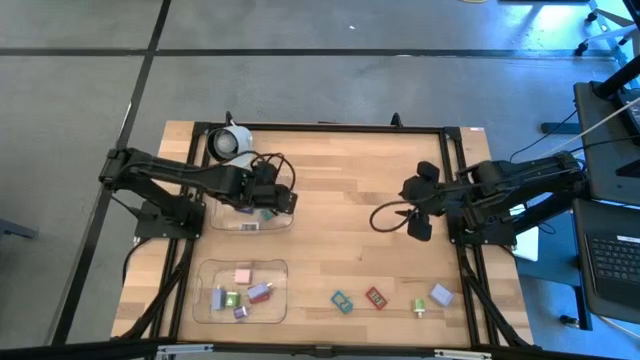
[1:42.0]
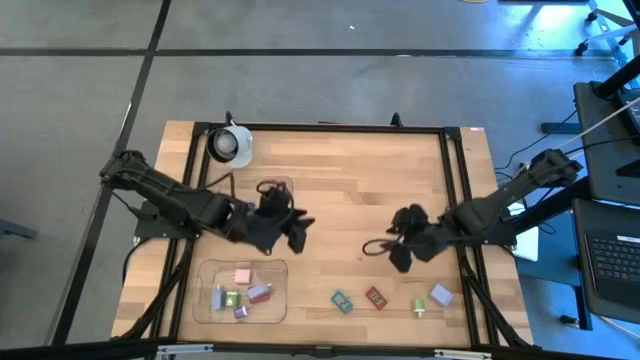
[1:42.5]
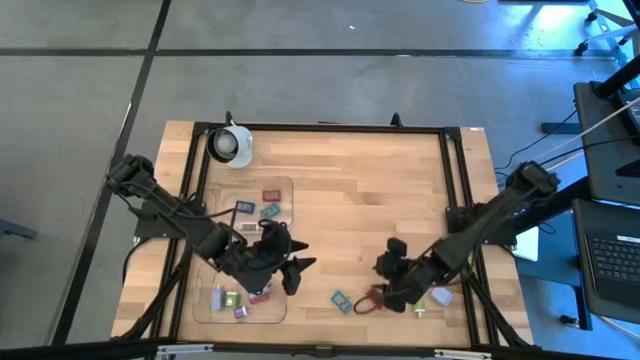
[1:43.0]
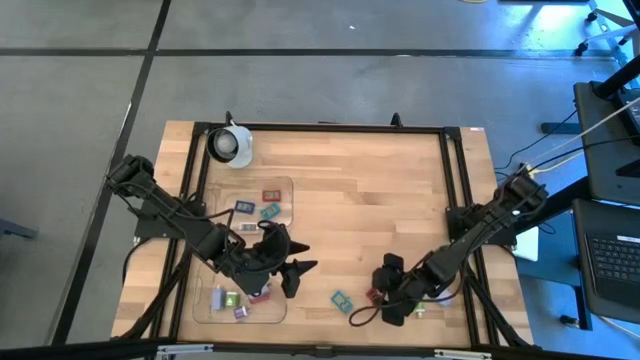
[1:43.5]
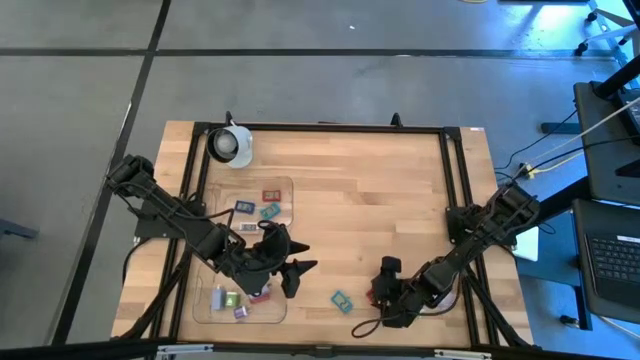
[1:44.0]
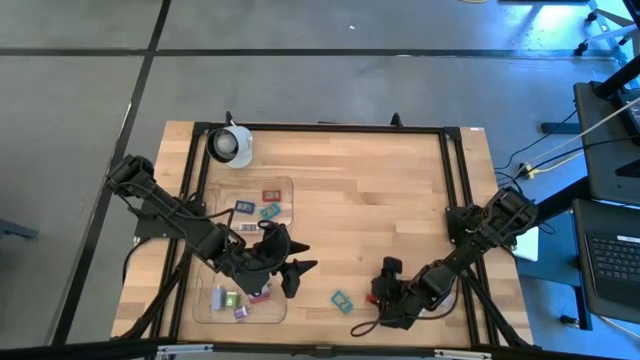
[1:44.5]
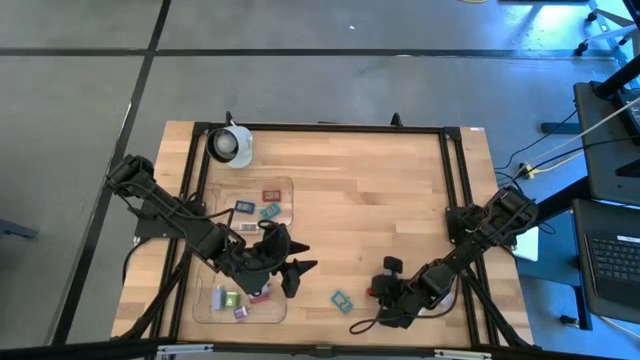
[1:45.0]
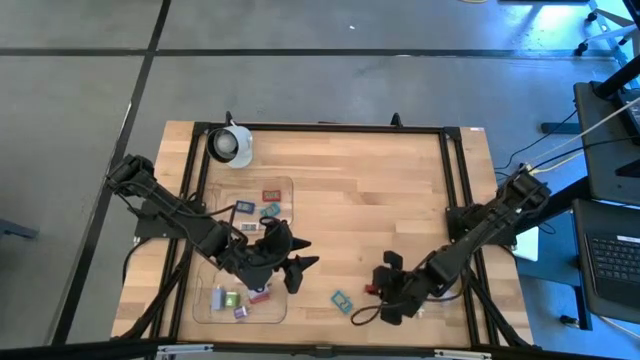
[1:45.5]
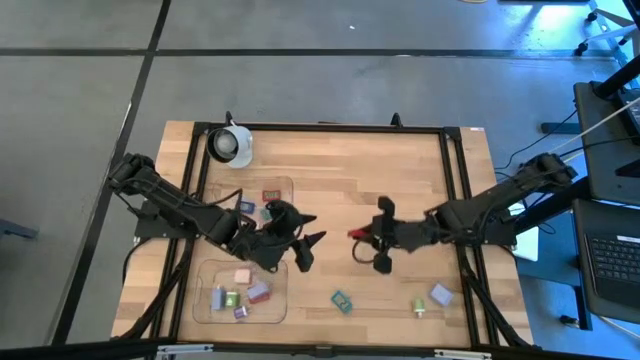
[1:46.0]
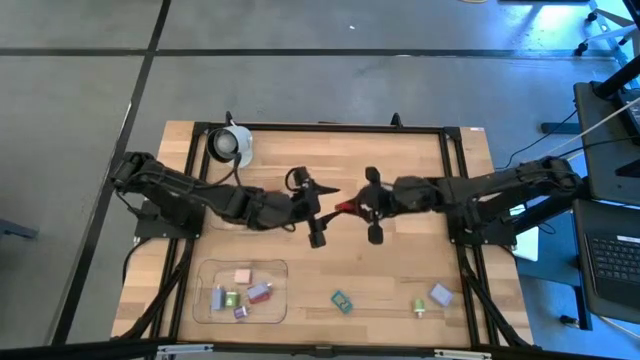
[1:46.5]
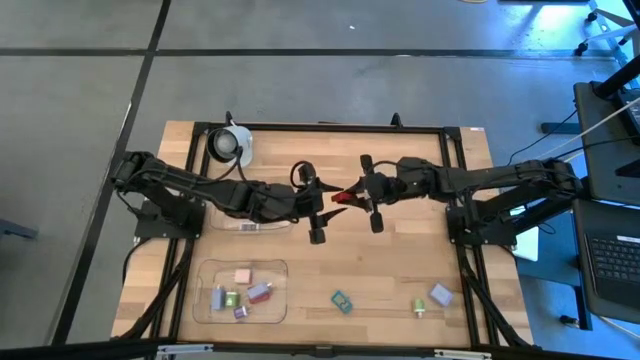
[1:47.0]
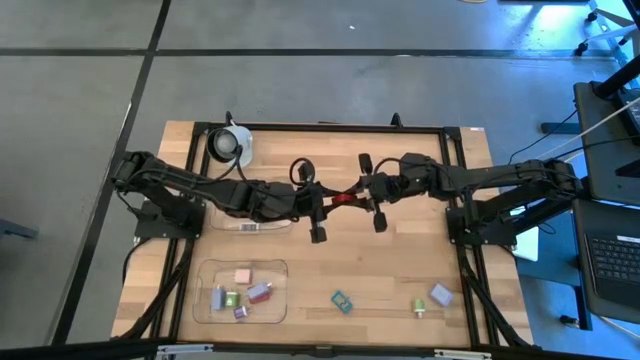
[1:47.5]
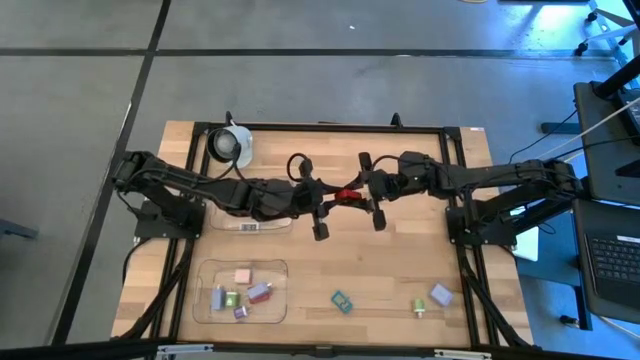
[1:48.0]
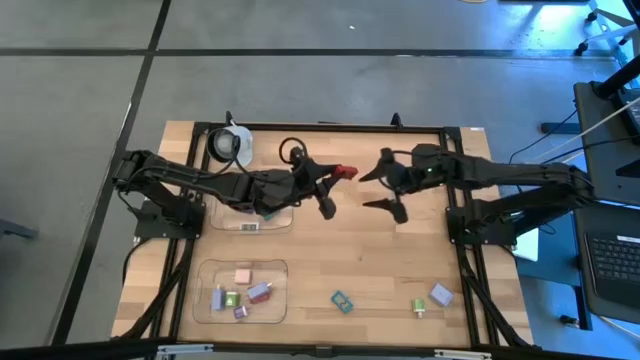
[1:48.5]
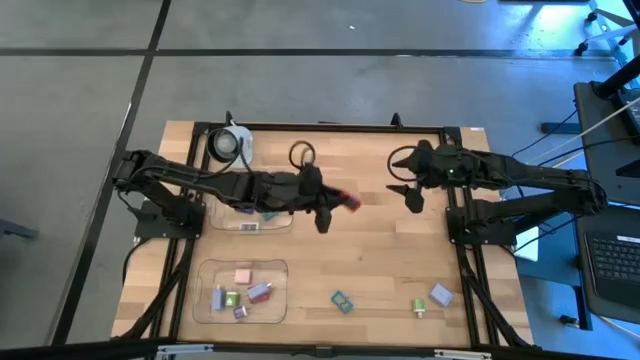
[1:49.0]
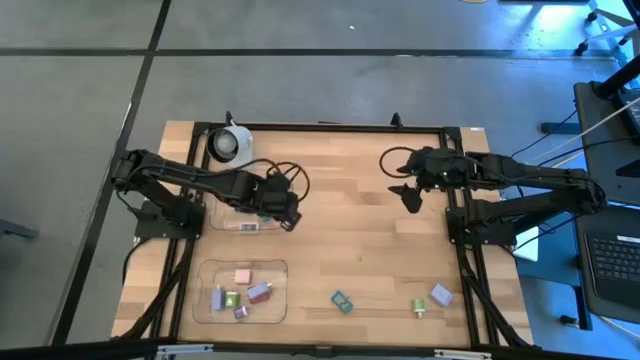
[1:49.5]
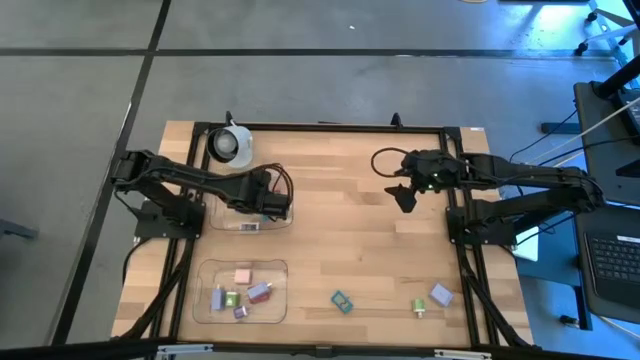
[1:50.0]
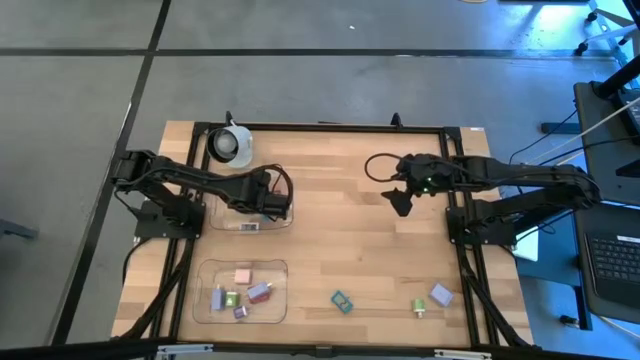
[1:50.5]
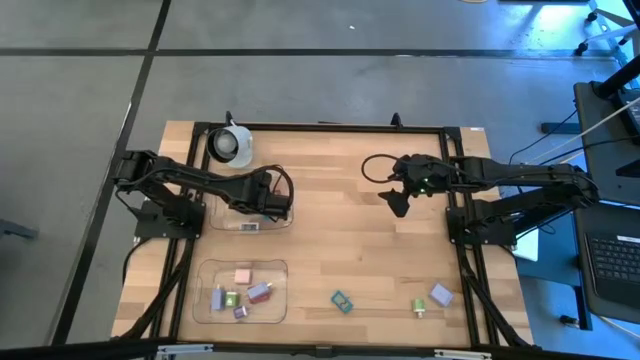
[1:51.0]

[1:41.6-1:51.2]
Task: Pick & Place Office items
Put the red timer into the top transparent bin

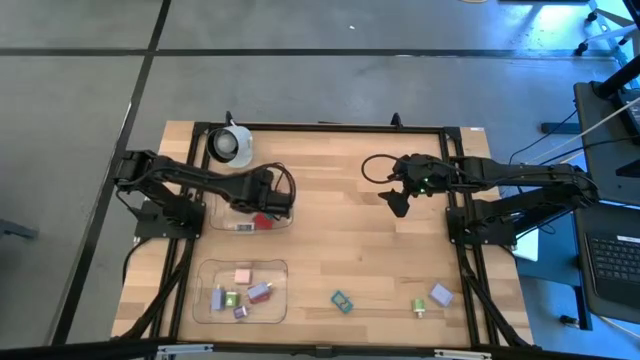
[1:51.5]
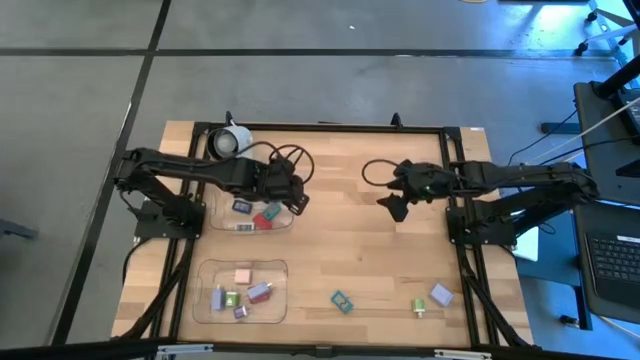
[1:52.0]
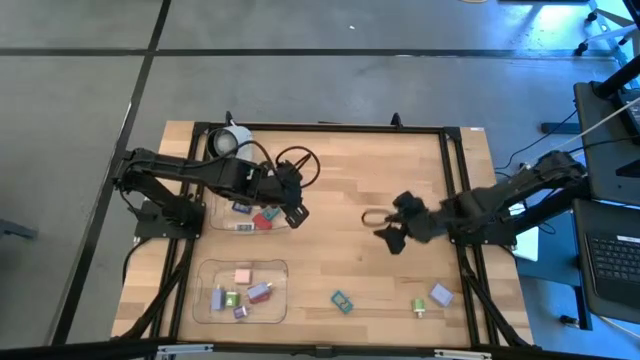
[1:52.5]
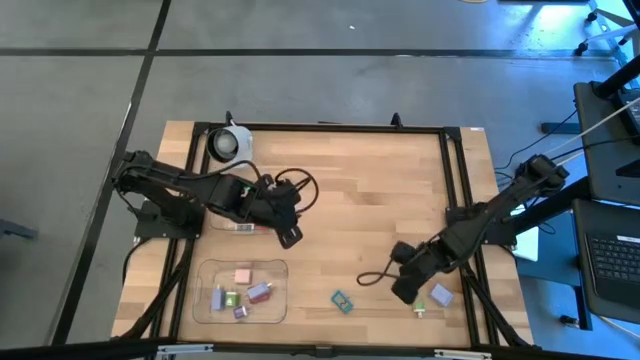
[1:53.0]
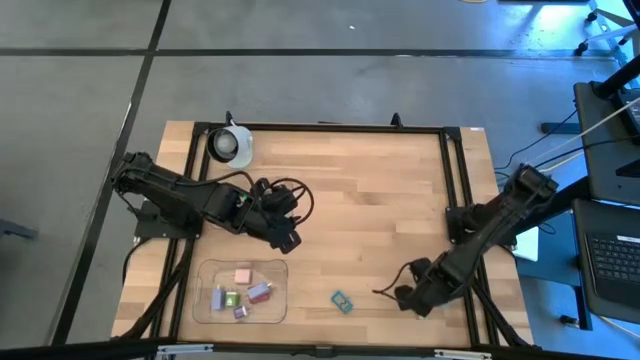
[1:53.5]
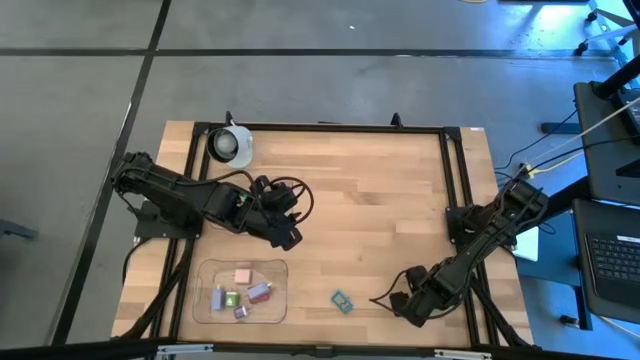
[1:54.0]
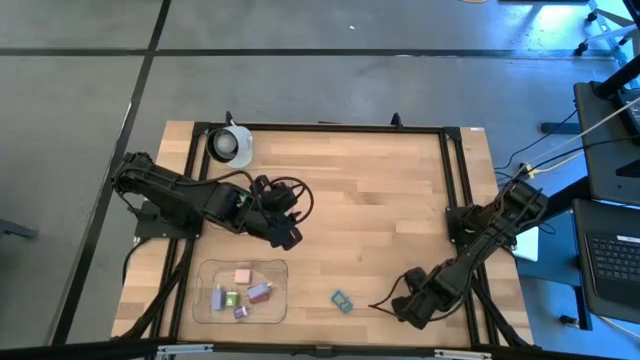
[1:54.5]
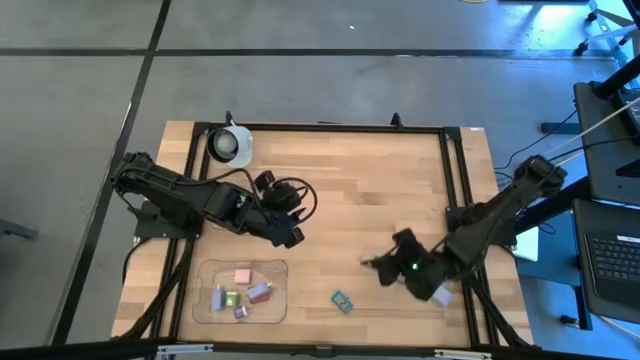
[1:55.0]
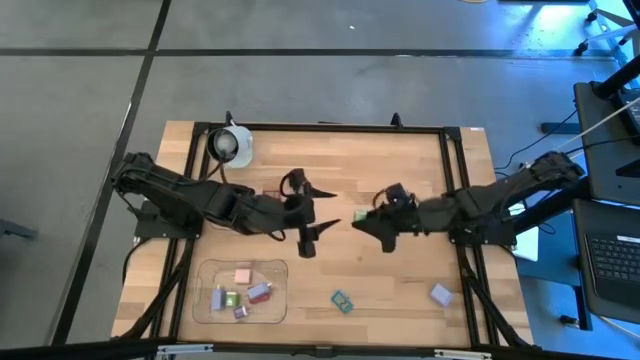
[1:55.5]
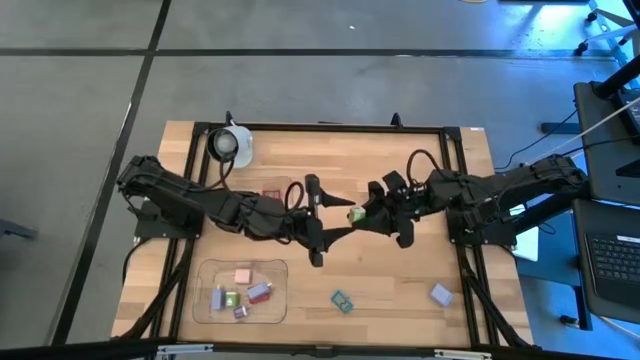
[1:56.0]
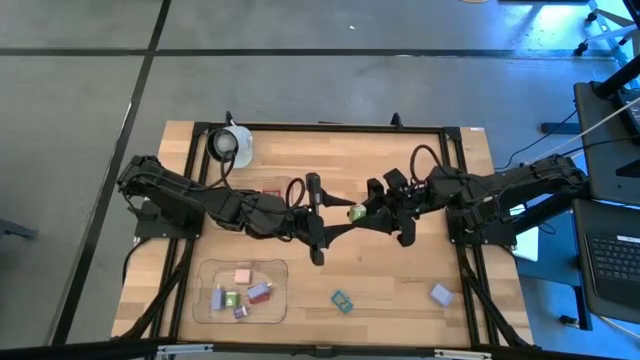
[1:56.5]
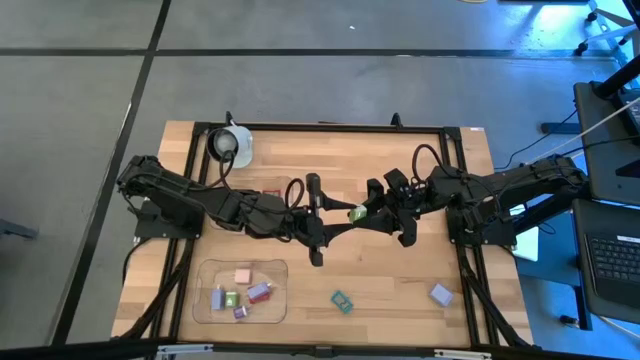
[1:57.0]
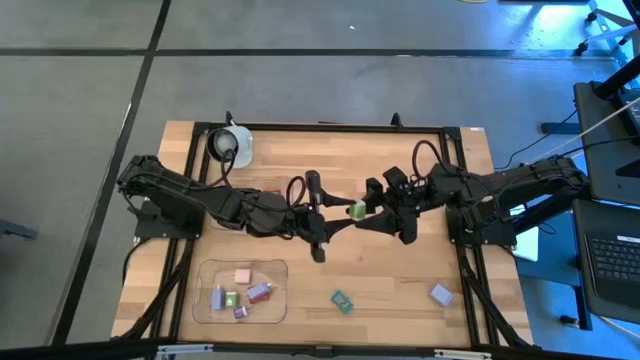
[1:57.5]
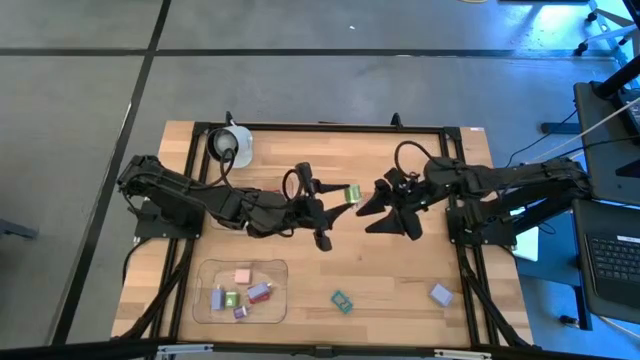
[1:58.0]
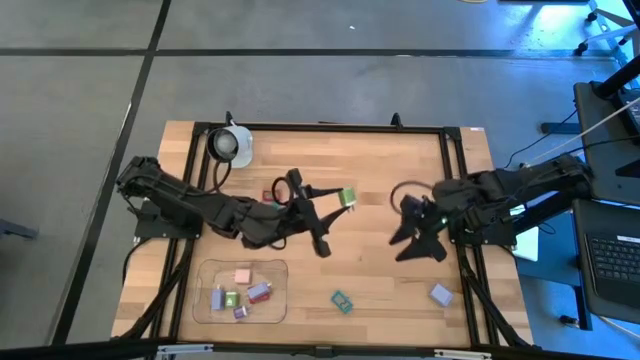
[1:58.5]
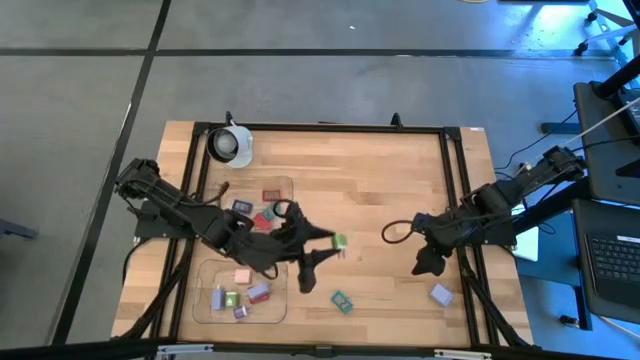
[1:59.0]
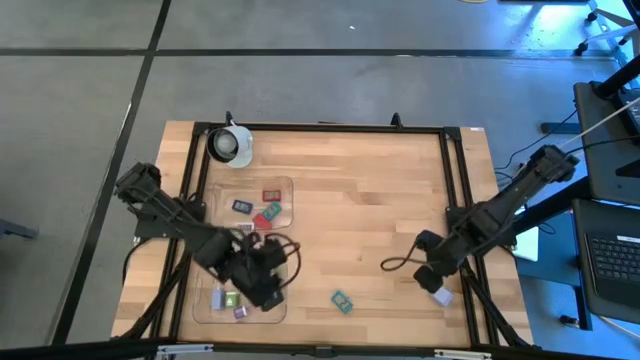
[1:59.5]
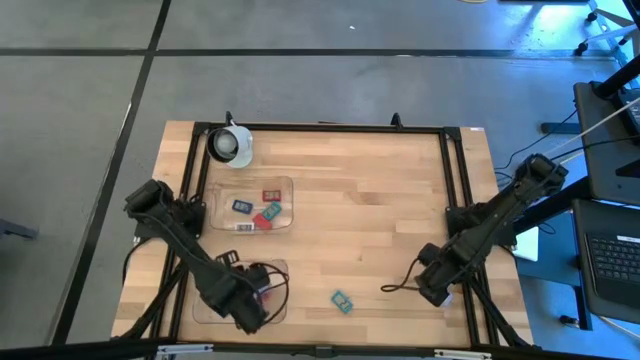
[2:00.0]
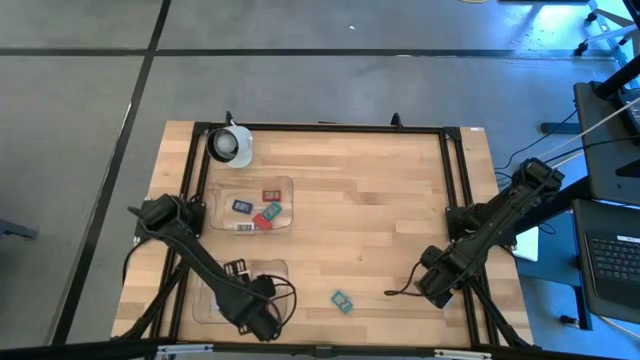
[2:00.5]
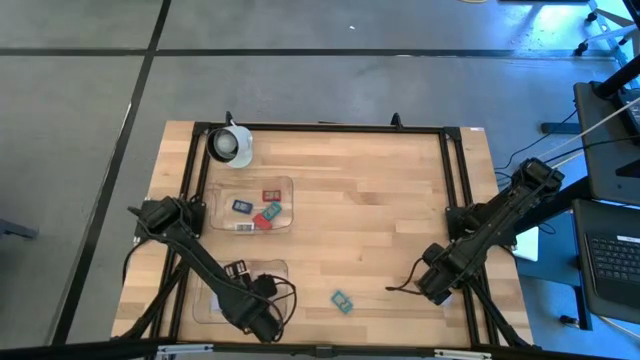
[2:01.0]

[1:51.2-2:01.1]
Put the green charger adapter into the bottom transparent bin

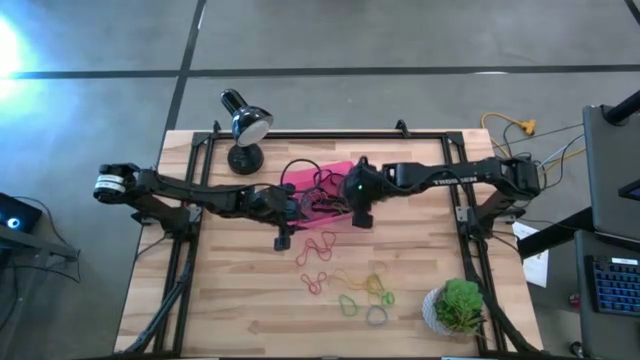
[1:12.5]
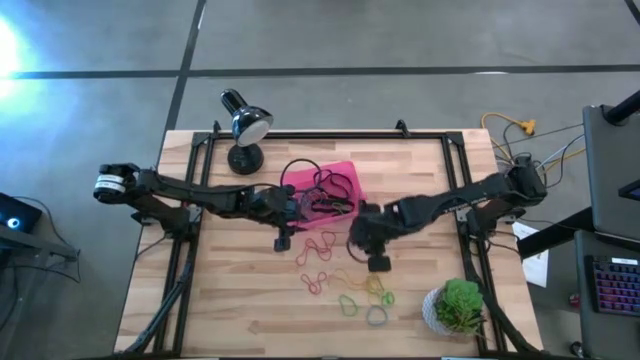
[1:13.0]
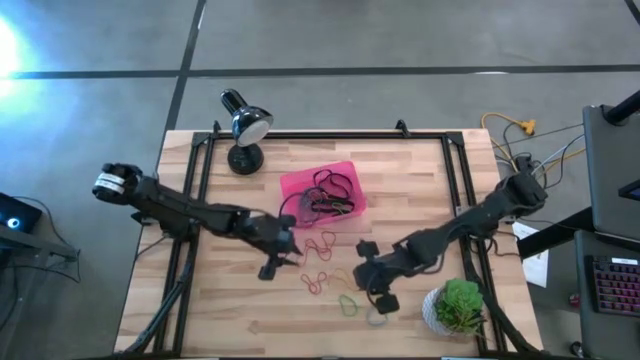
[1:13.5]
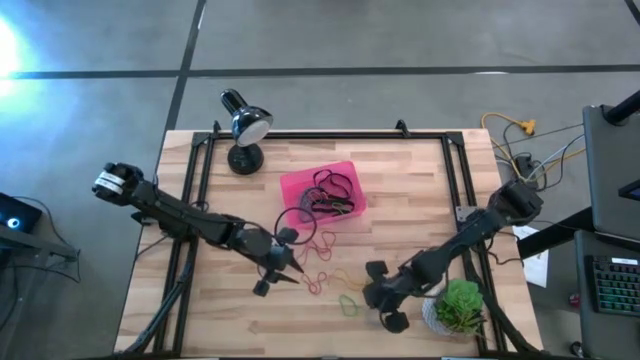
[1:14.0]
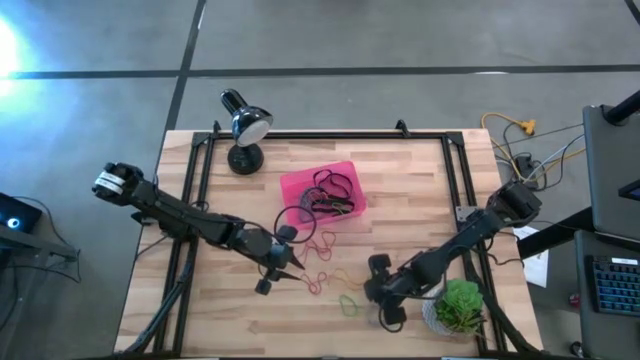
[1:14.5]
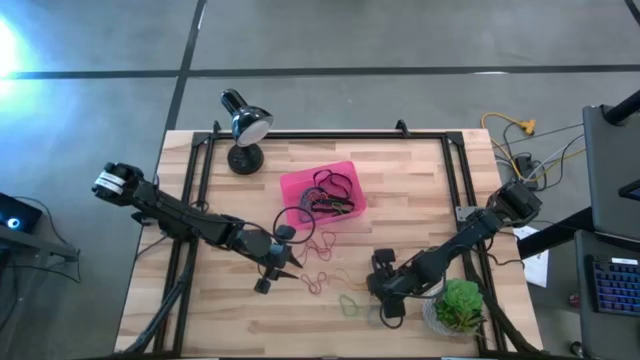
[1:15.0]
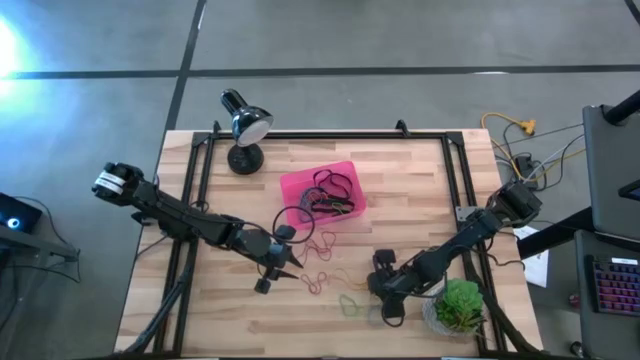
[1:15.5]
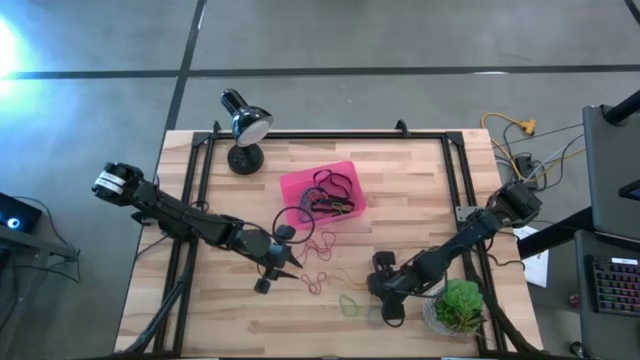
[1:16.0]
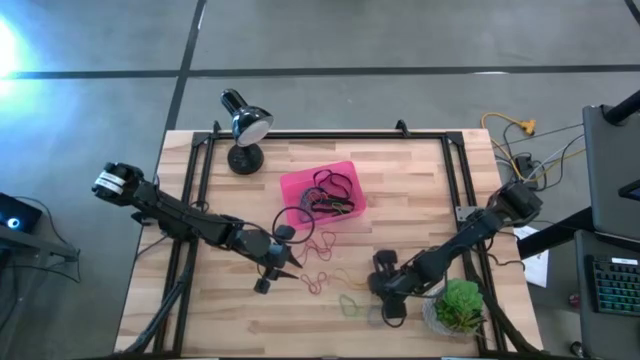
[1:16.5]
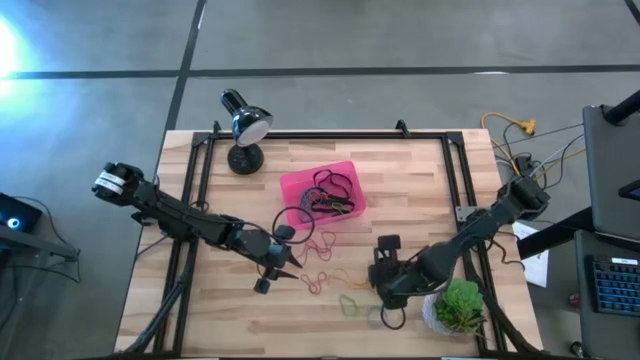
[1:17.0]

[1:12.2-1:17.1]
Task: Pick and place rubber bands into bin
Put the yellow rubber band into the red bin
